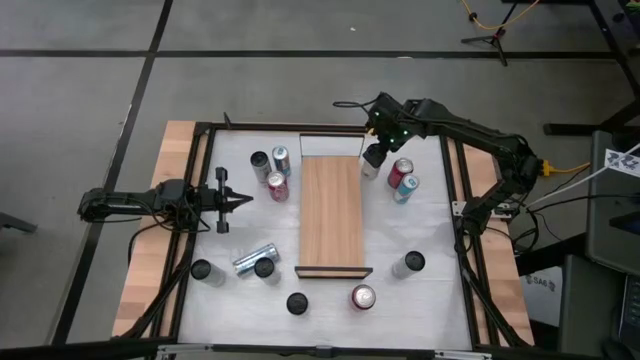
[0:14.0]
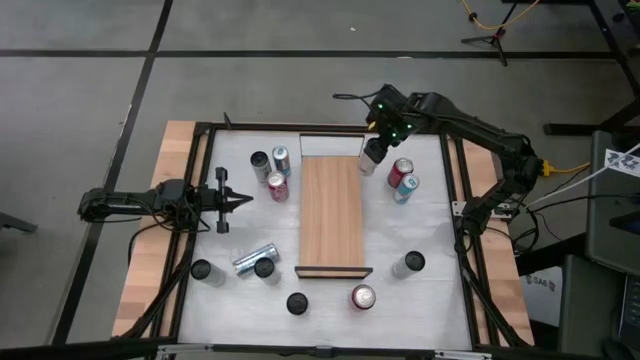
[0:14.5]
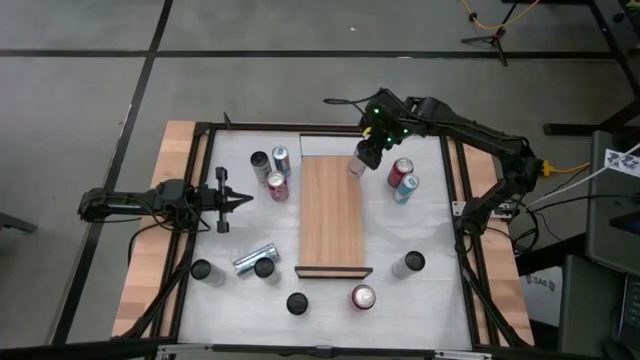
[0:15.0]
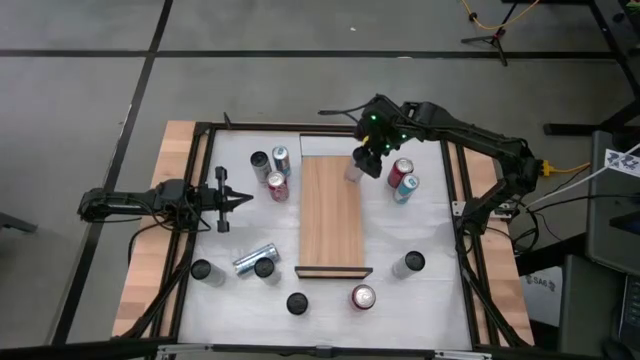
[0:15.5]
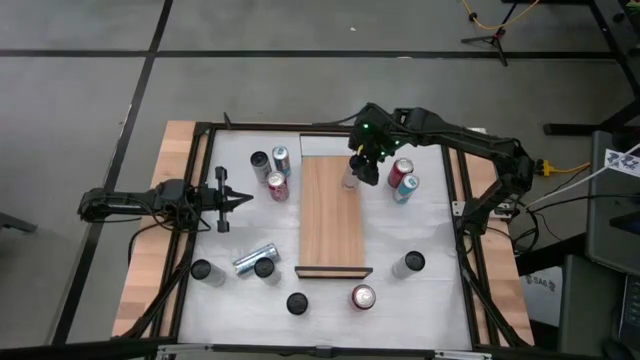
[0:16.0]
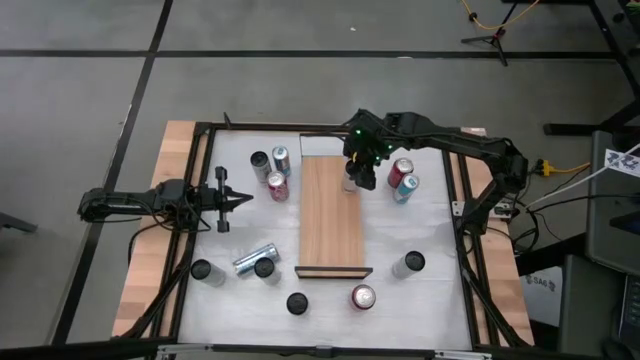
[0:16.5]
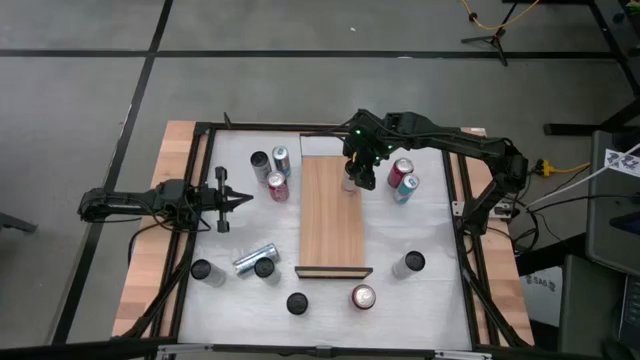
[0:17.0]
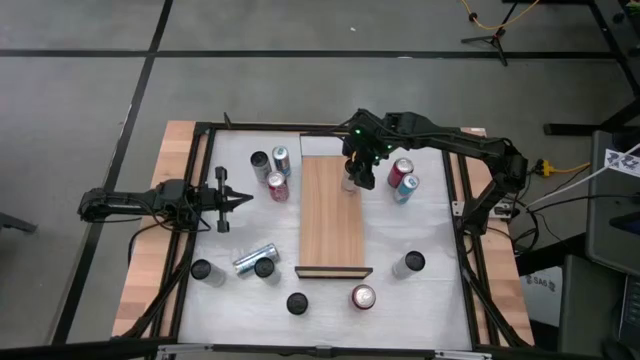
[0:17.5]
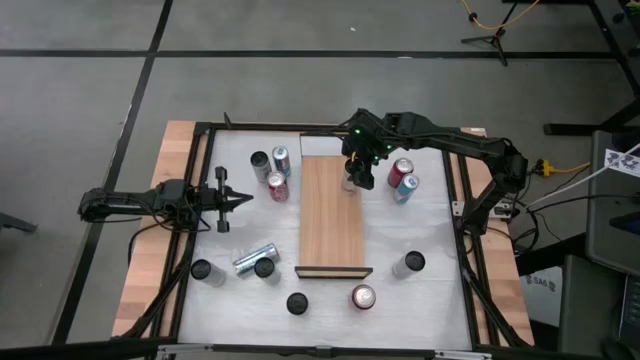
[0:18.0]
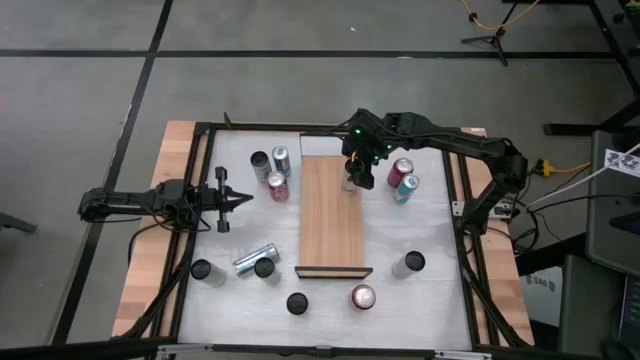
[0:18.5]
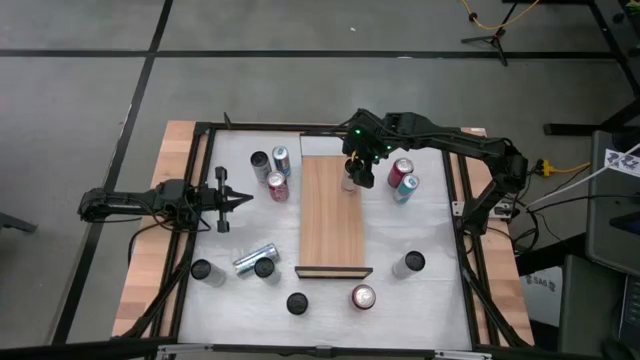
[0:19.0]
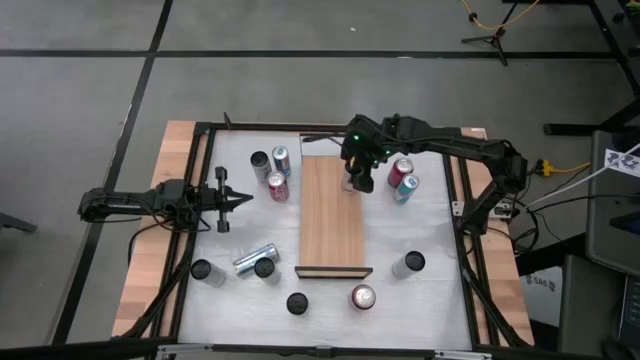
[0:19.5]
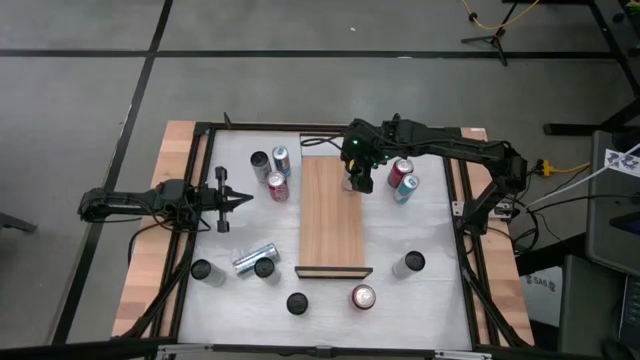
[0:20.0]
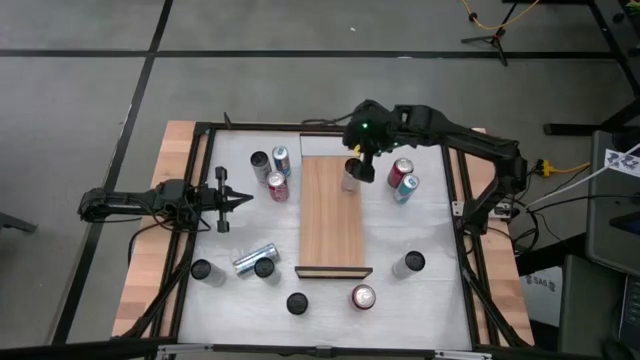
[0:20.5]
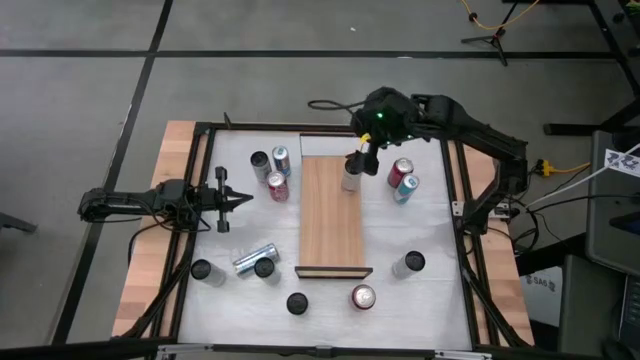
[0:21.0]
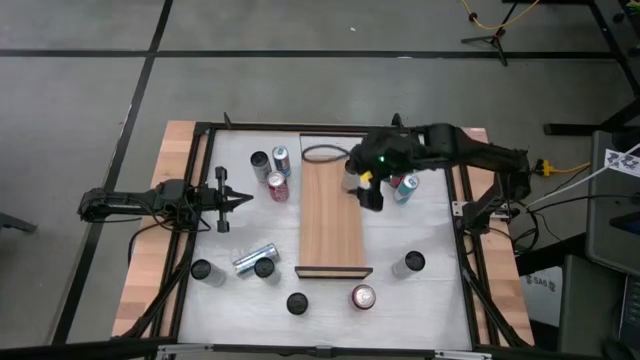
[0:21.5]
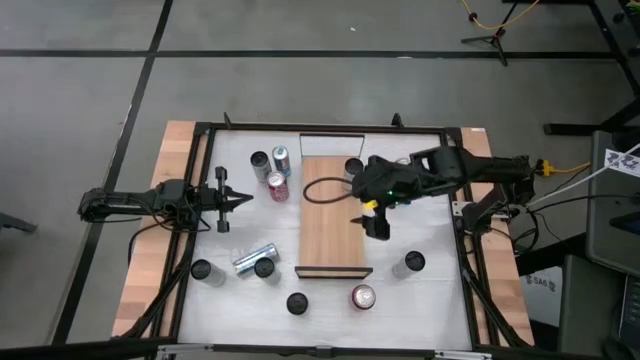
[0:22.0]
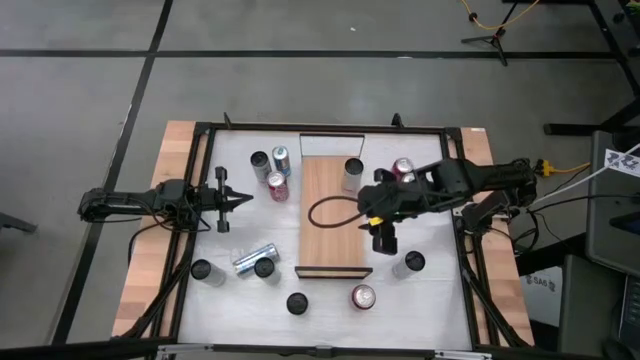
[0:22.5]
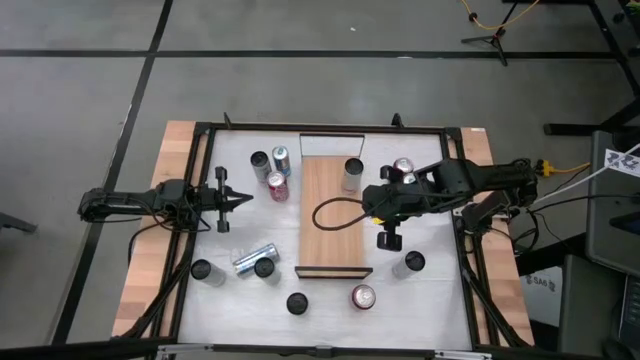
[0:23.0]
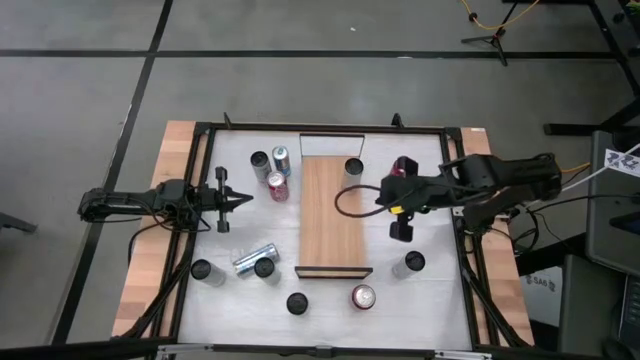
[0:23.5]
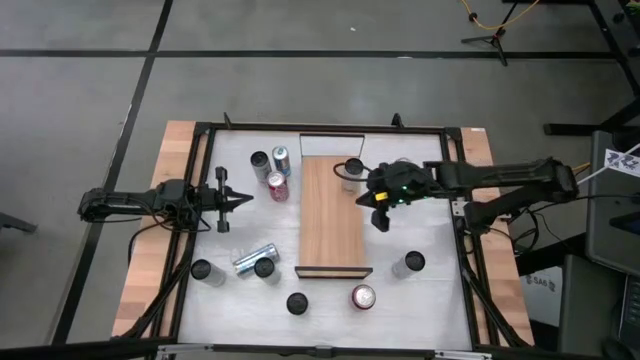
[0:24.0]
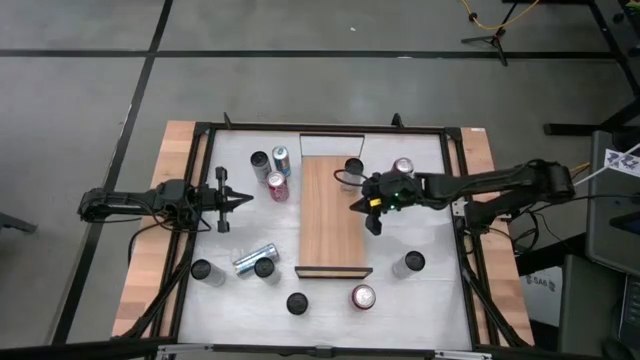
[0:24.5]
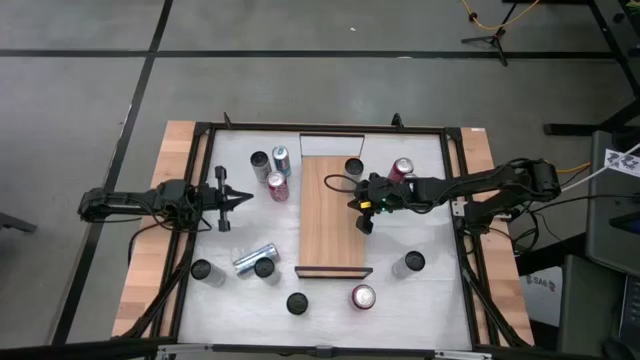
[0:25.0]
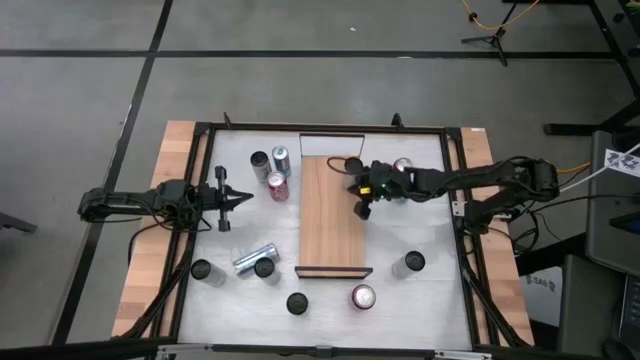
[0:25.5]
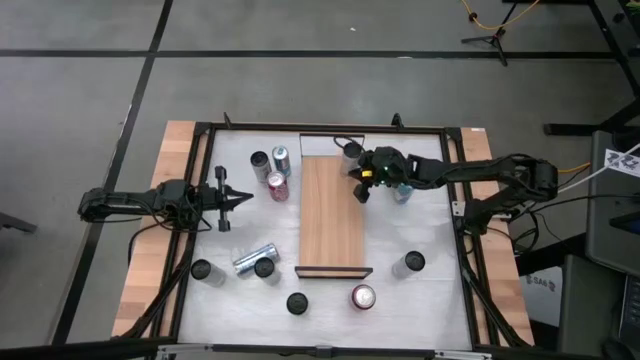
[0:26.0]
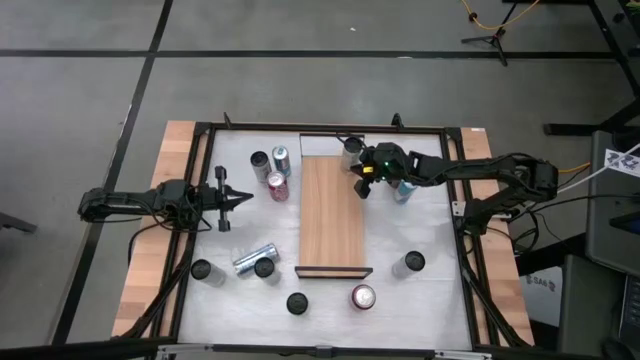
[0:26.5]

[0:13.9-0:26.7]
Task: Place canned beverage on shelf
Put the white pink soda can on the shelf
